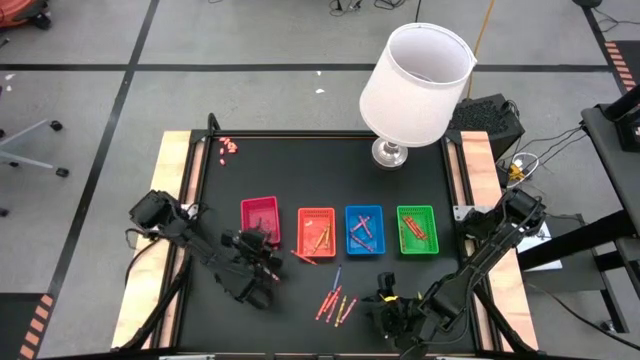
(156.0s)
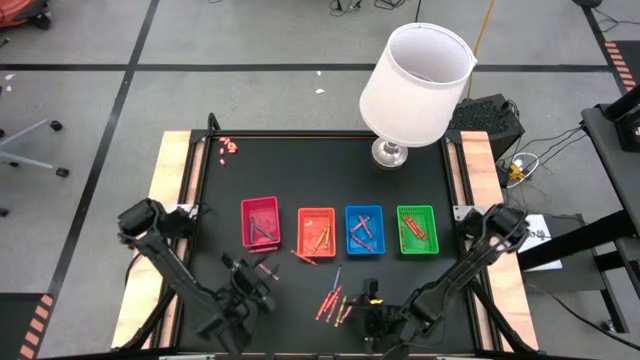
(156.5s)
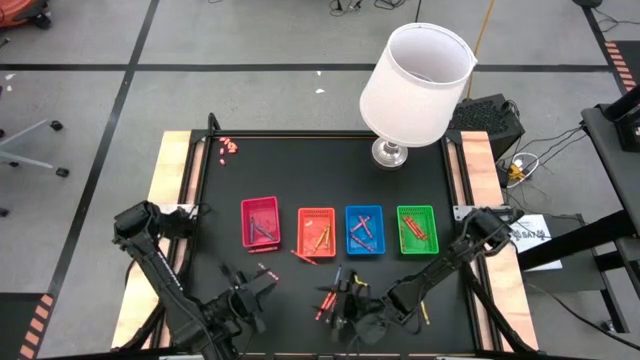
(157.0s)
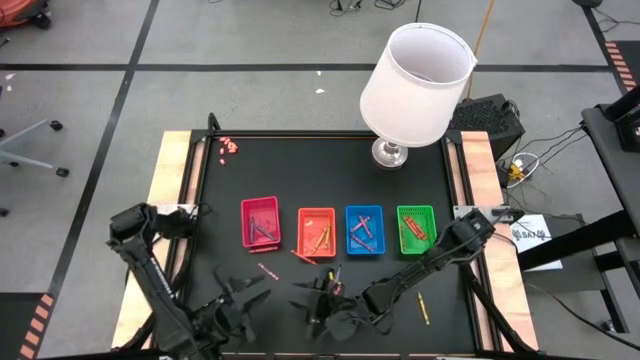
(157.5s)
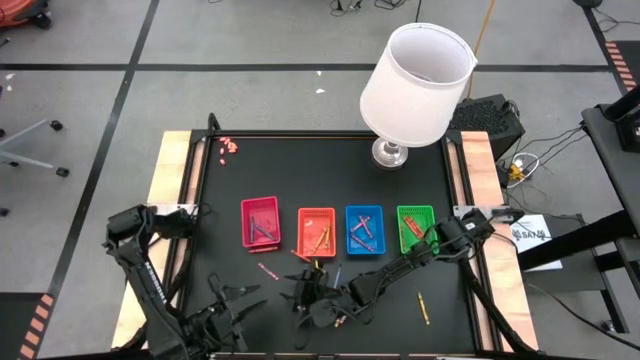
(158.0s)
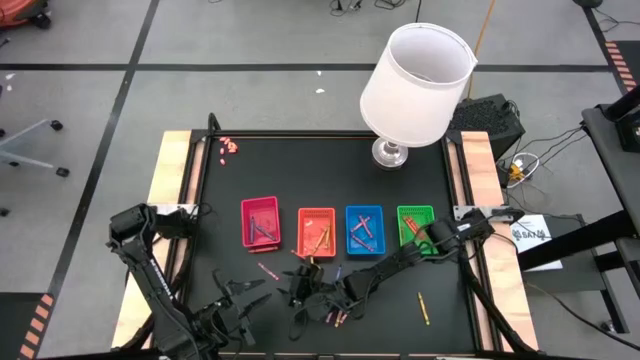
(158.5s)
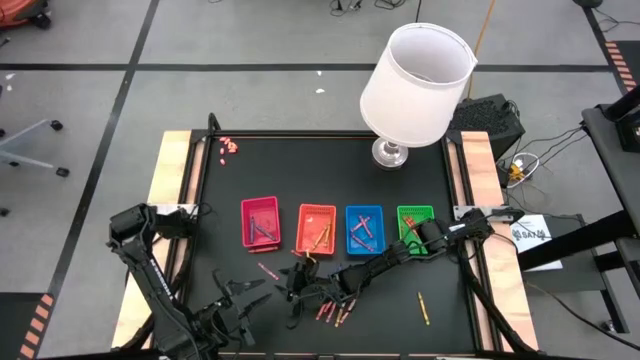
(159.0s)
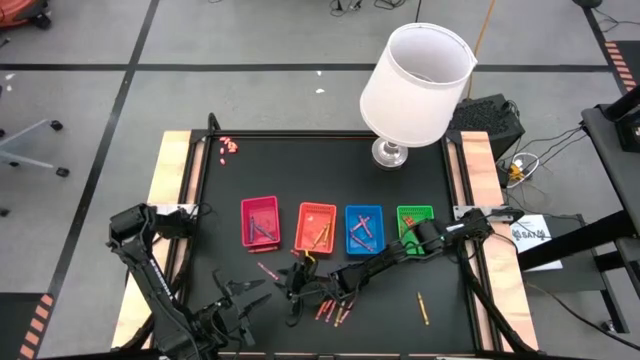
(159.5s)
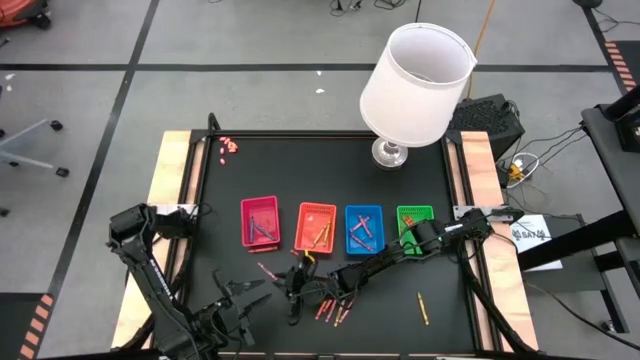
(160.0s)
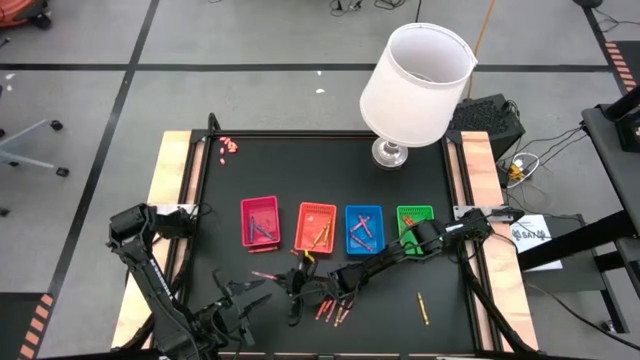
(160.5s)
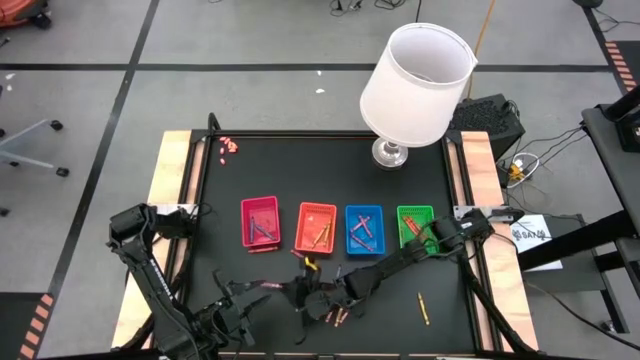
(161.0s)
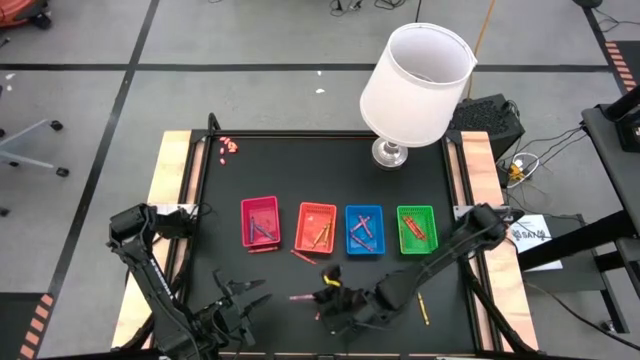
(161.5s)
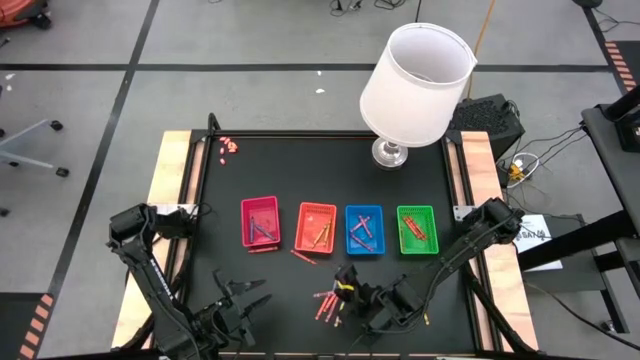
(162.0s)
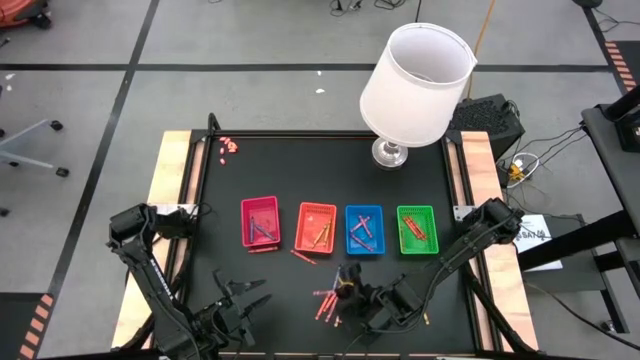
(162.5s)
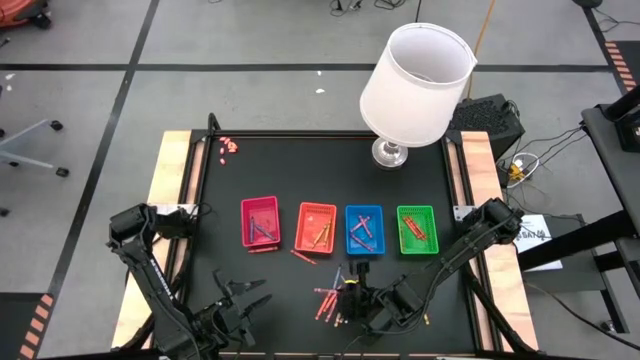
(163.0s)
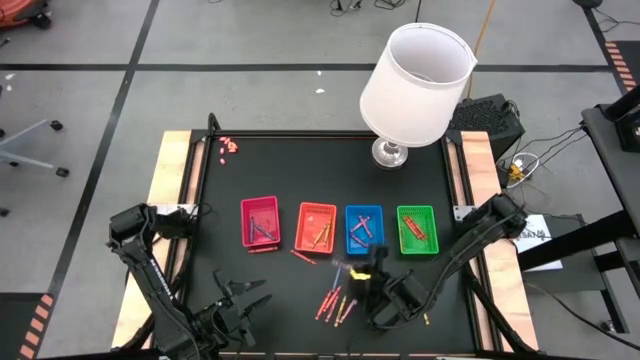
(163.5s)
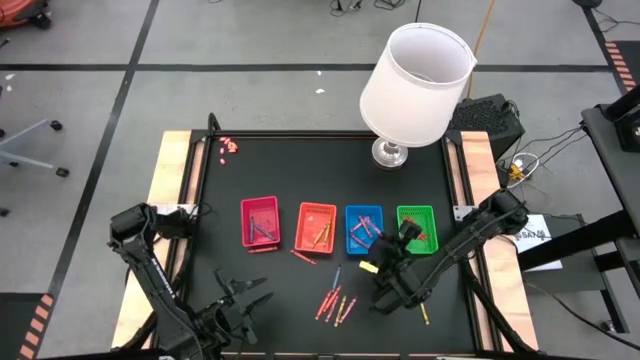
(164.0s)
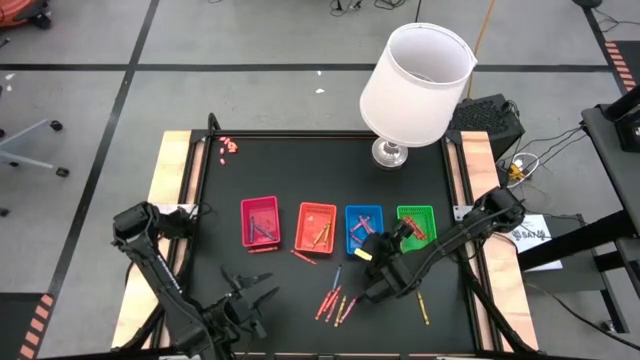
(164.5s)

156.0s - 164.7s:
Task: Sort crayons
Put the red crayon into the blue bin

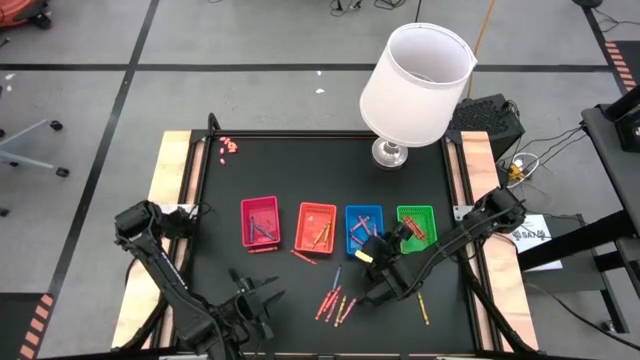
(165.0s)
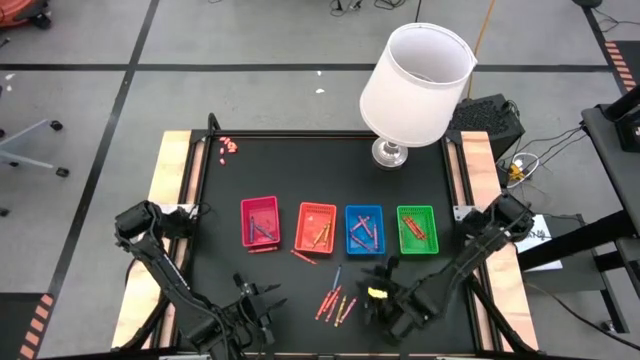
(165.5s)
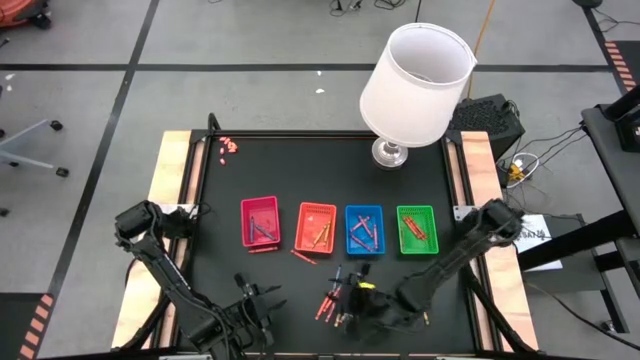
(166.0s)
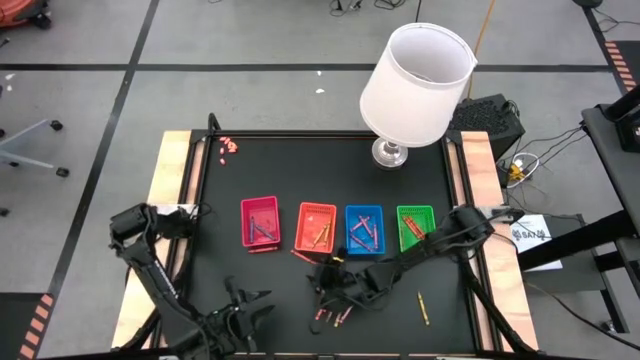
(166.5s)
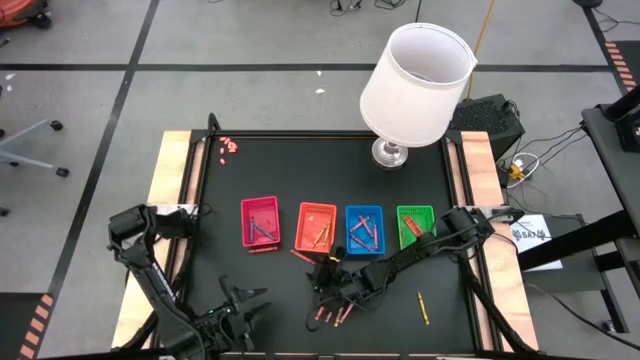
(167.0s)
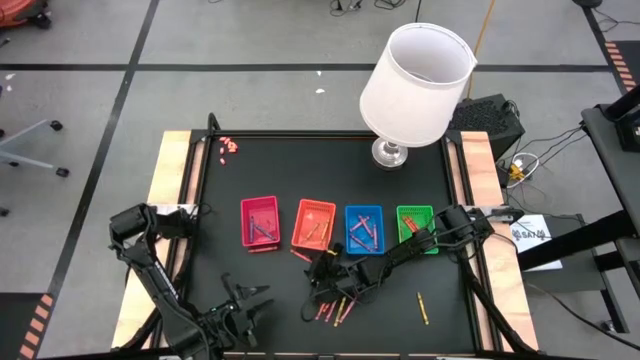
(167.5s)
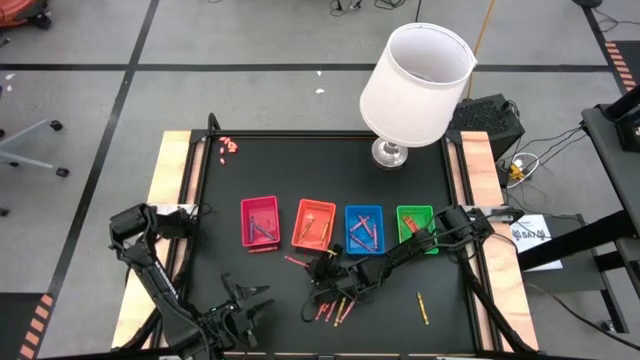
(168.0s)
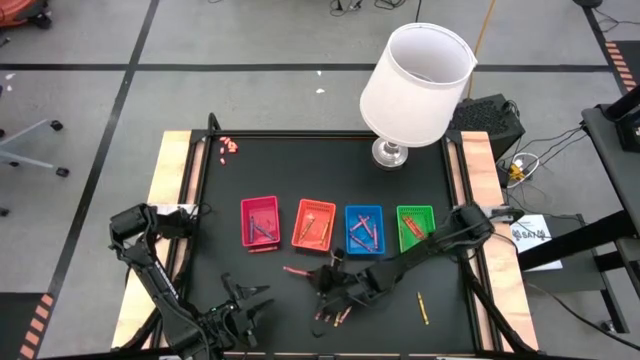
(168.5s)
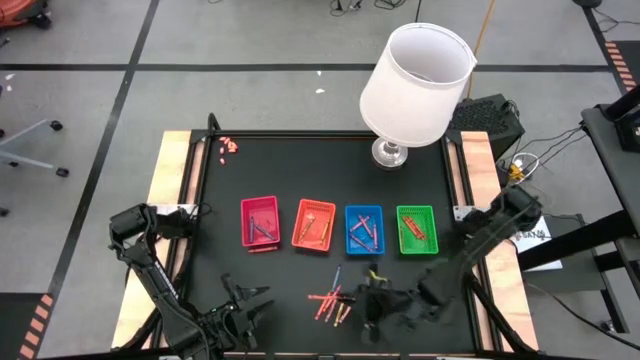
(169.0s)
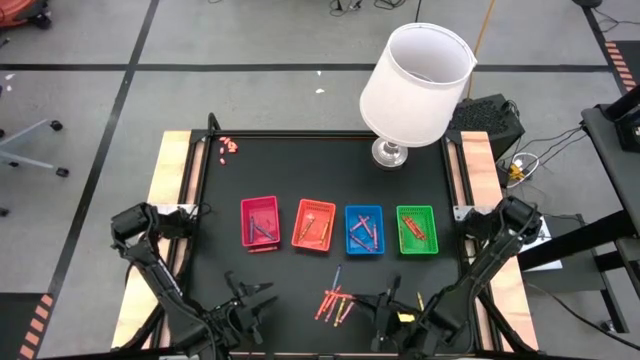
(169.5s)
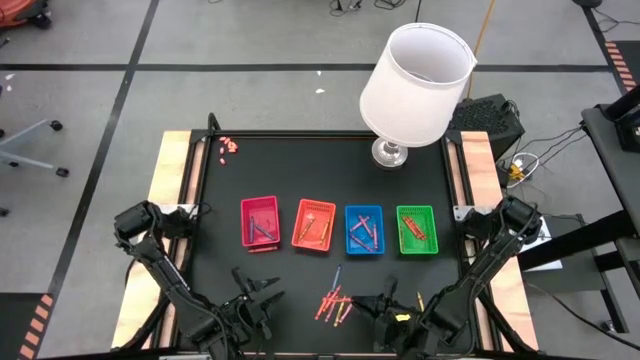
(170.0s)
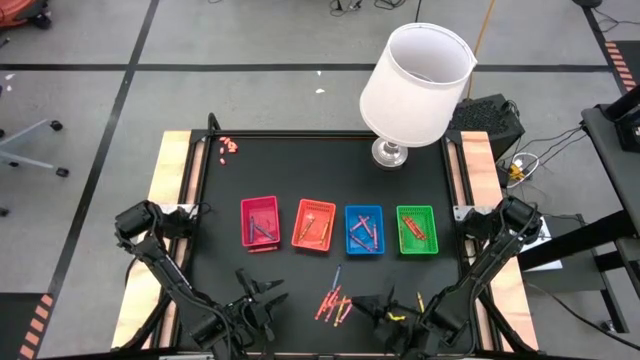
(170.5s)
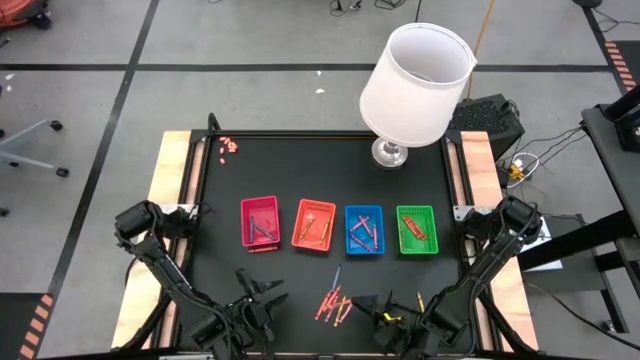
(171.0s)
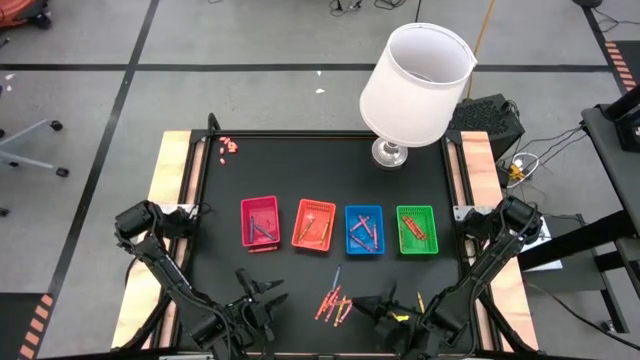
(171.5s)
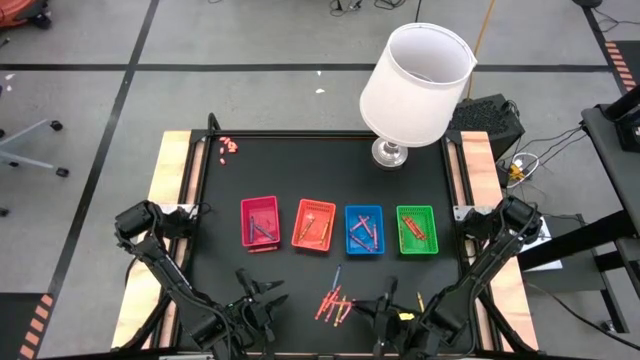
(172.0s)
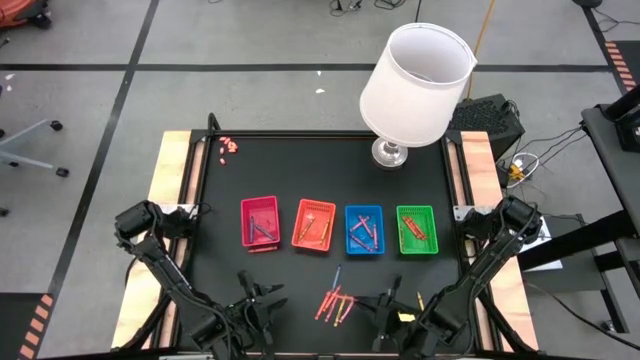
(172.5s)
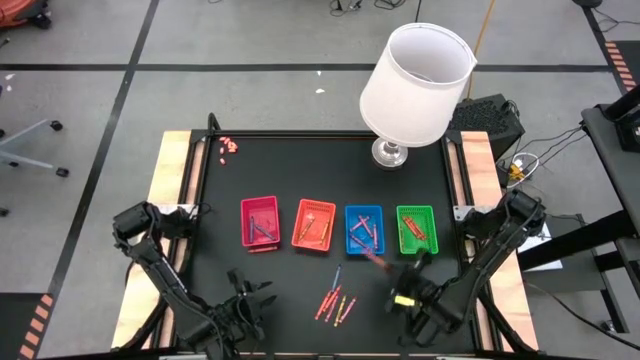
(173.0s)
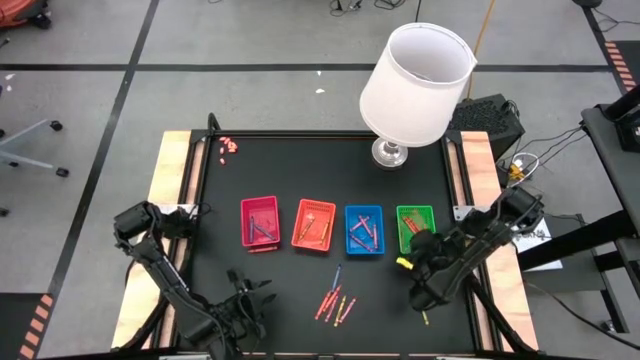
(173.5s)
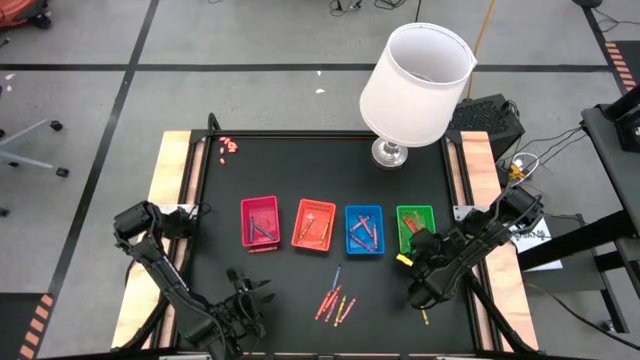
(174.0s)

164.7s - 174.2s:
Put the orange crayon into the green bin

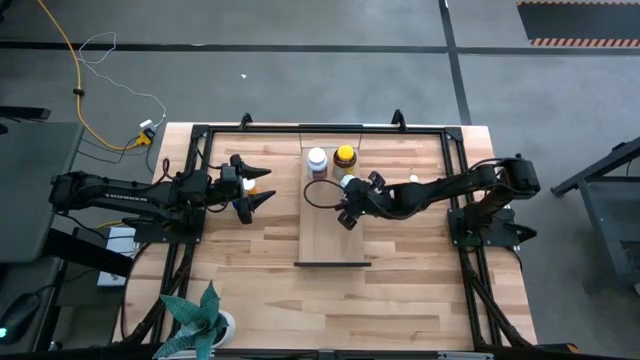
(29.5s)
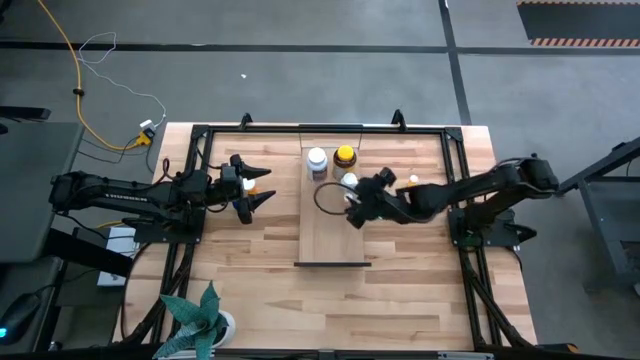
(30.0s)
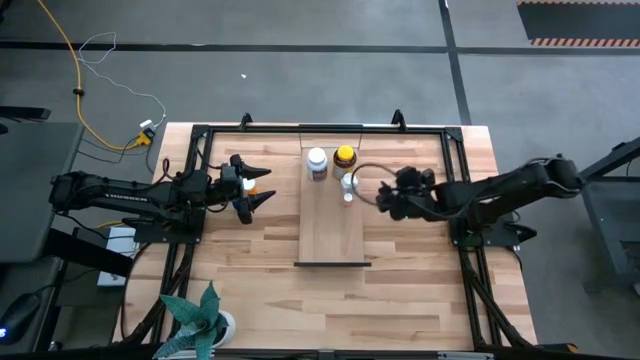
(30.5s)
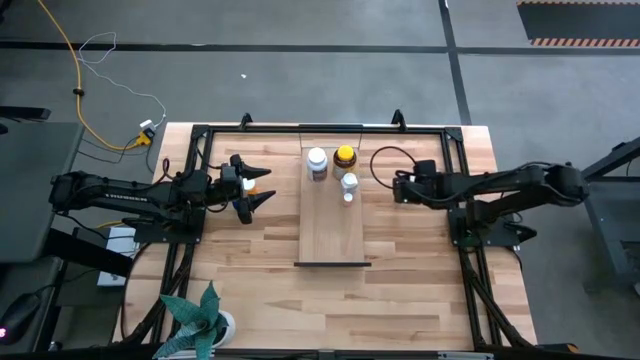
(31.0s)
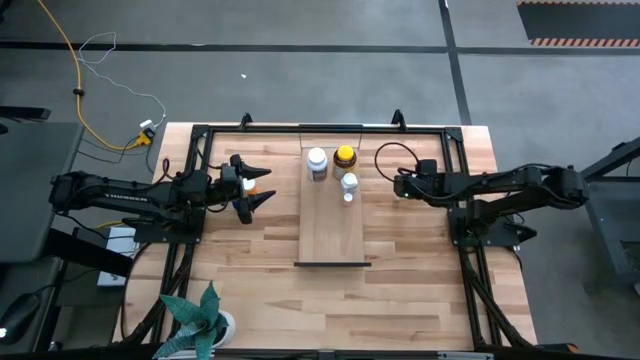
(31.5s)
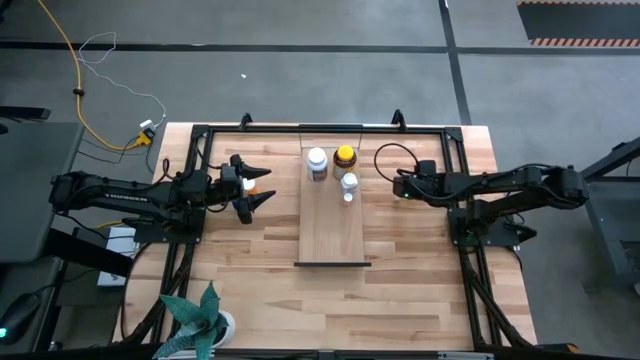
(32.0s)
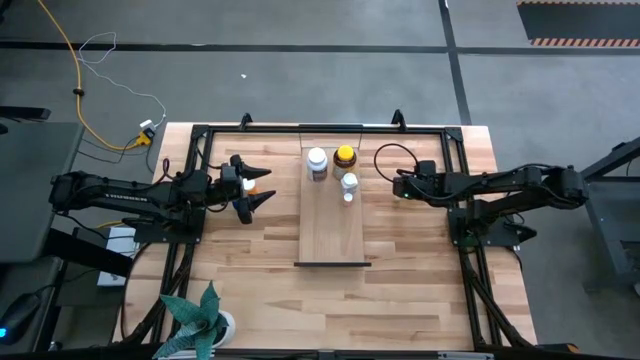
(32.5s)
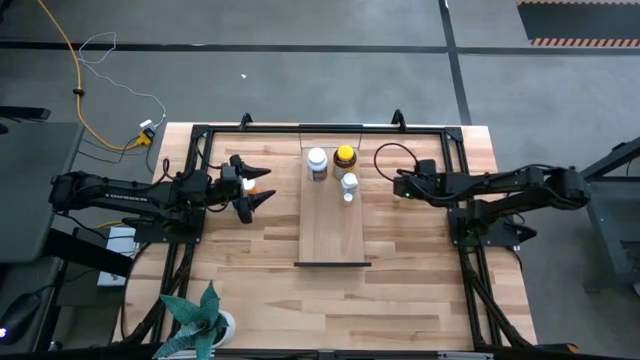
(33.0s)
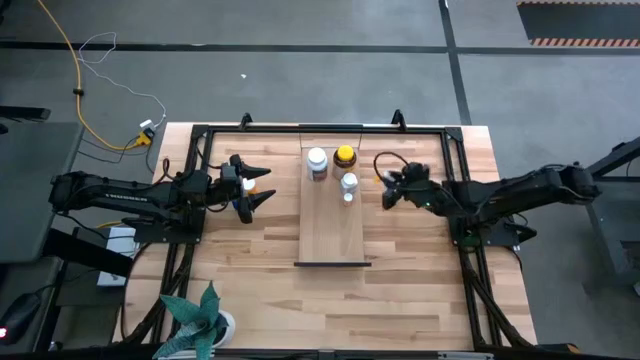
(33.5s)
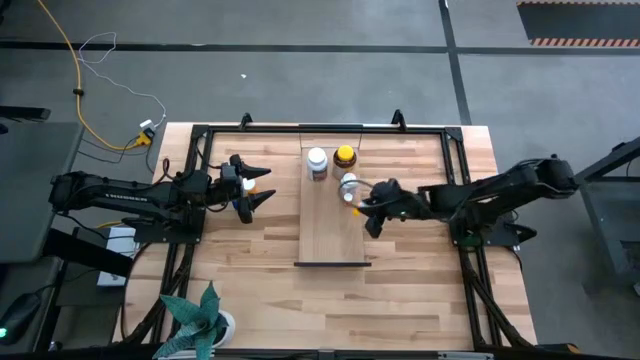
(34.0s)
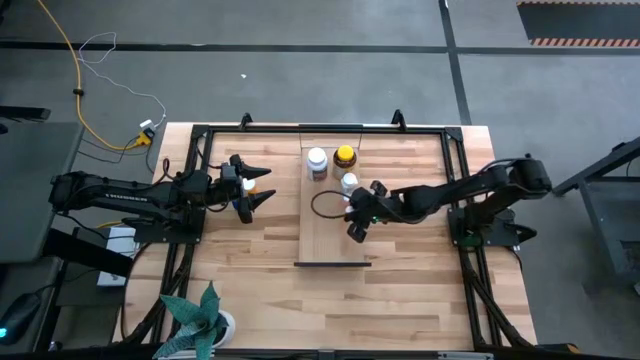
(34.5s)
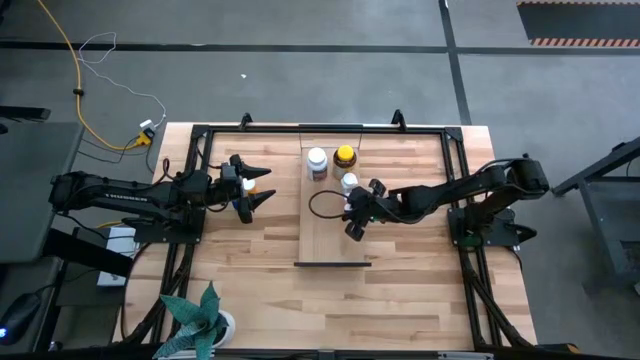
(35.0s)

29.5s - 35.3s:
Task: Pick and place medicine bottles onto shelf by color
Put the small orange pill bottle on the shelf
